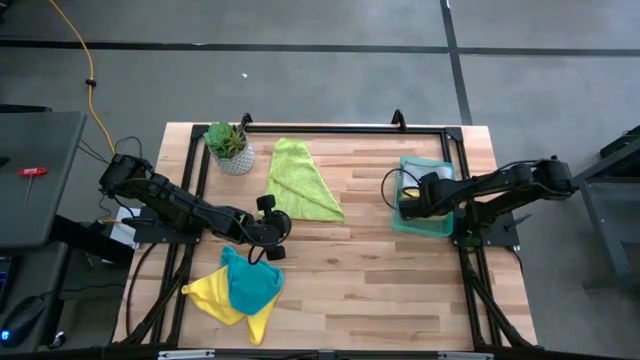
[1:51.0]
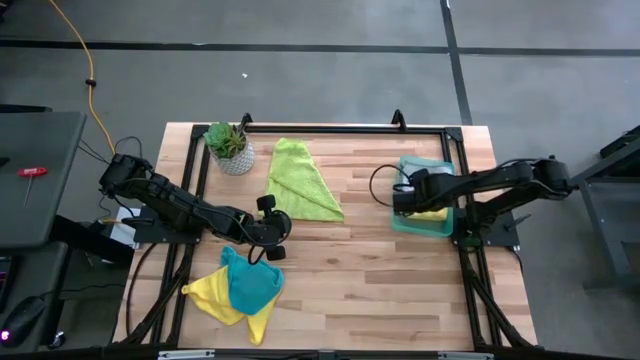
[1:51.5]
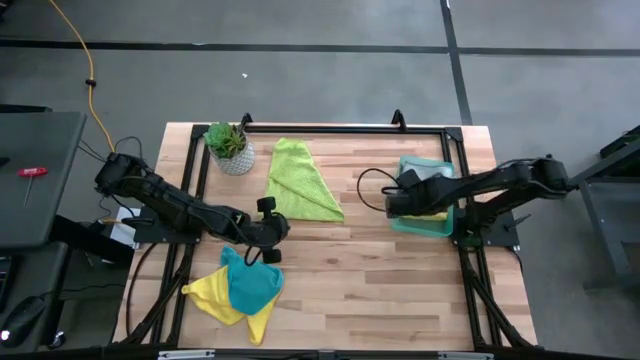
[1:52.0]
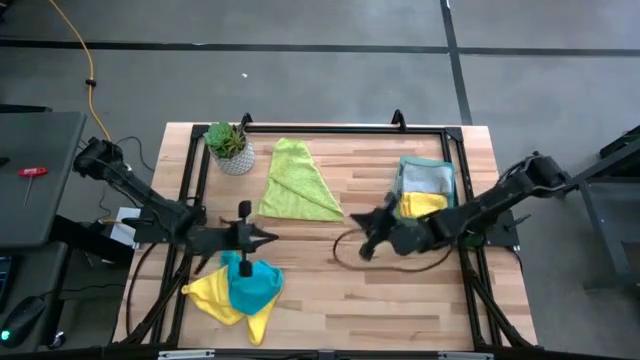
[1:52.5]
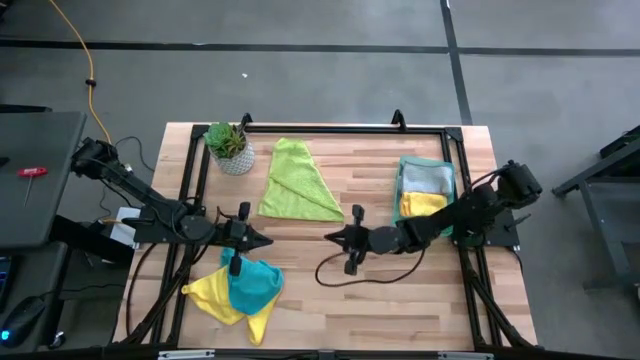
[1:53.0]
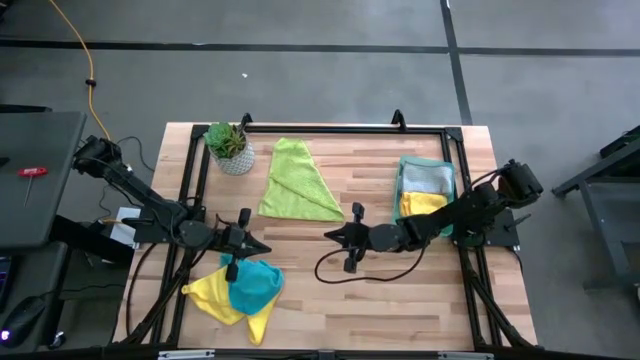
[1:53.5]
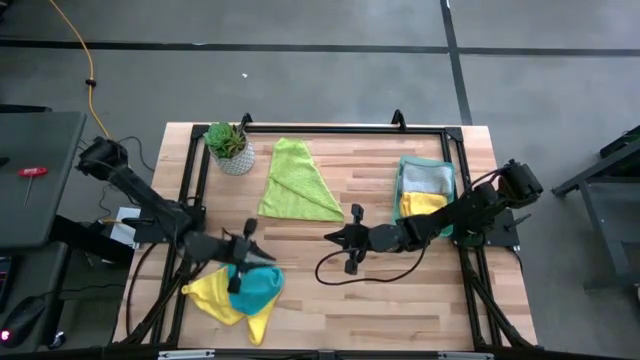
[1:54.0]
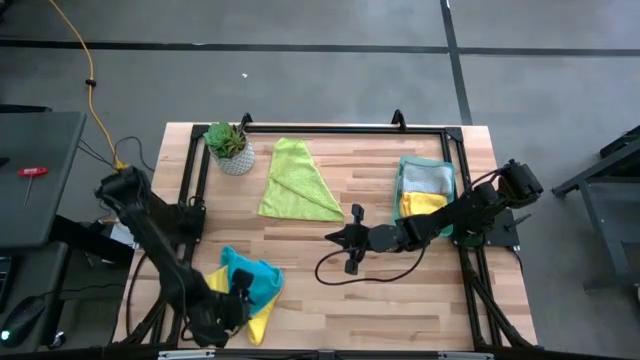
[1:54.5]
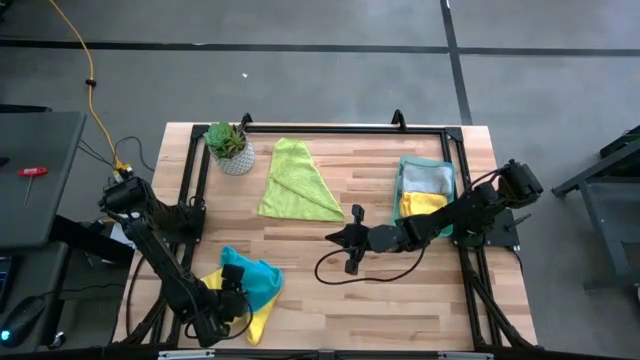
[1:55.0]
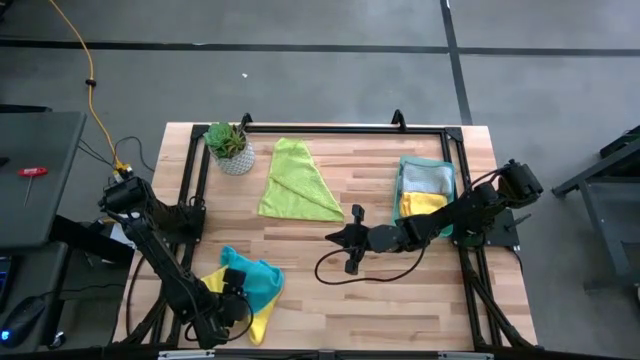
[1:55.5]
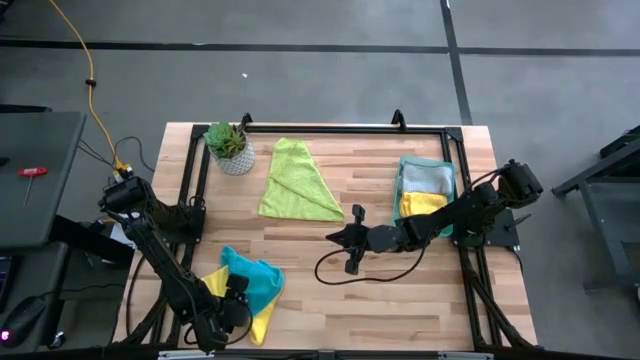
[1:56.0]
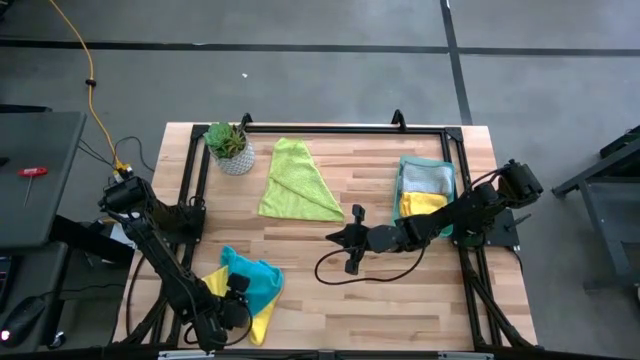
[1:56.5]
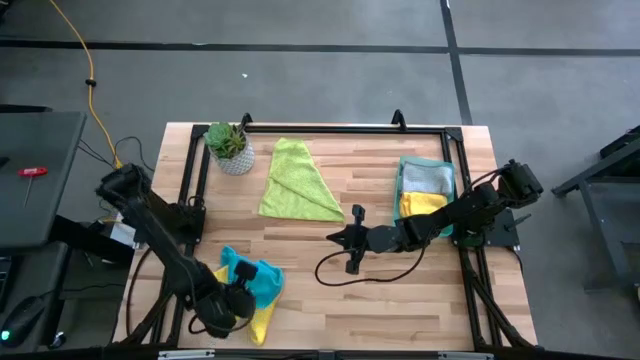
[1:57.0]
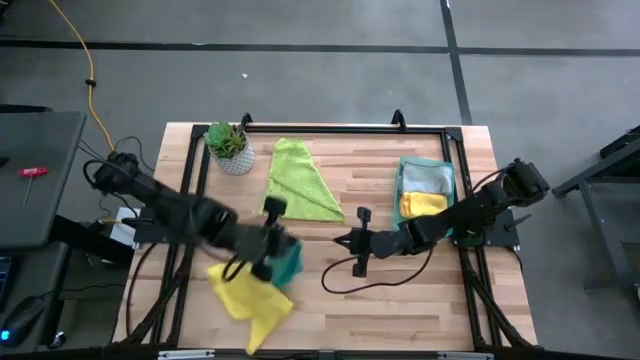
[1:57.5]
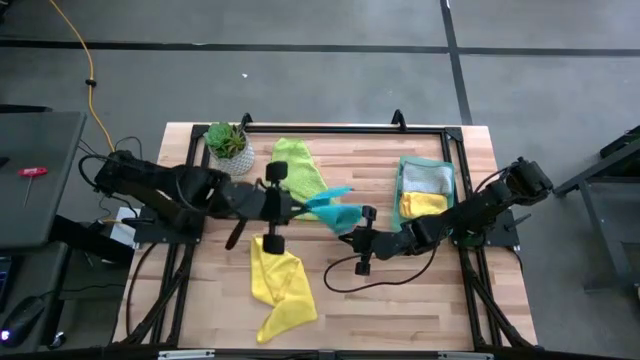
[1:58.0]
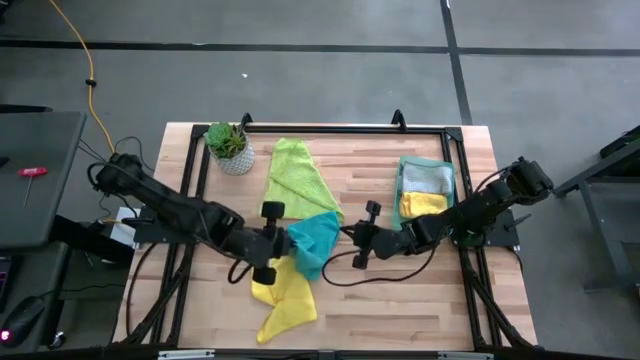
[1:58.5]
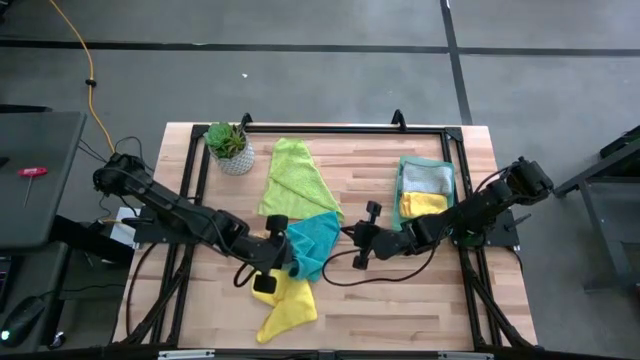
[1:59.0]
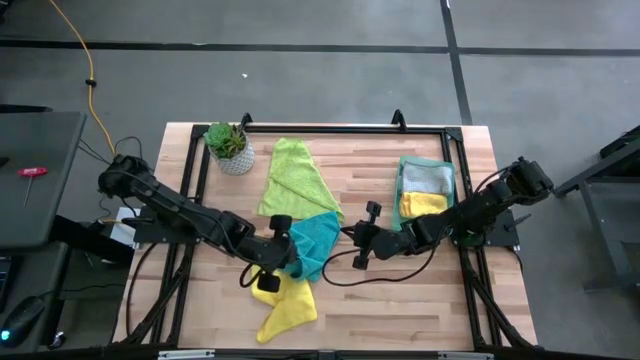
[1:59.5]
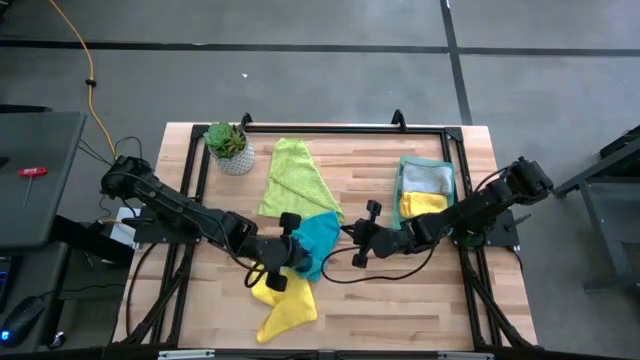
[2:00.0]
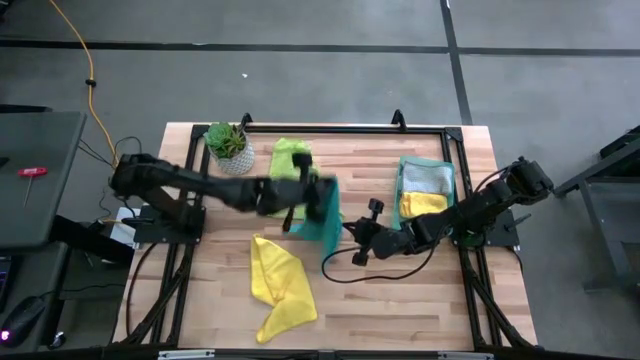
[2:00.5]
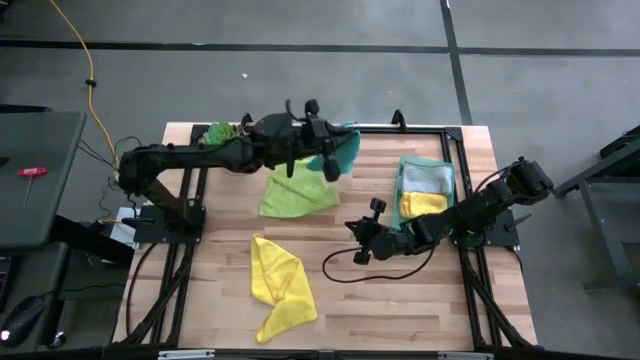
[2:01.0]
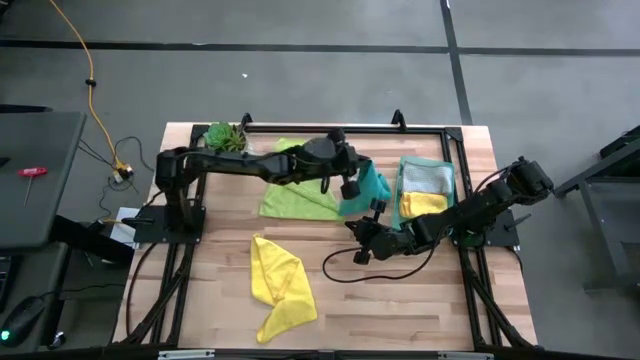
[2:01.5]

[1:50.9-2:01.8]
Task: Fold microfiber towels
Move the blue microfiber cloth to the center of the table

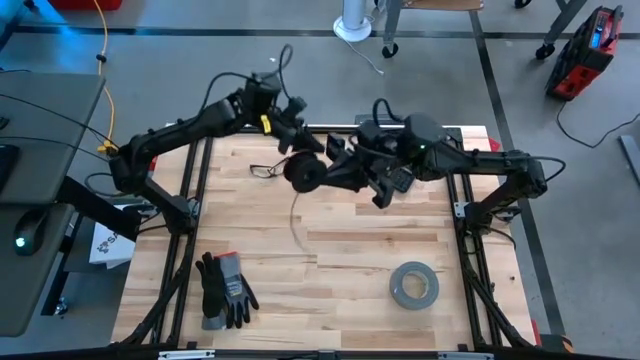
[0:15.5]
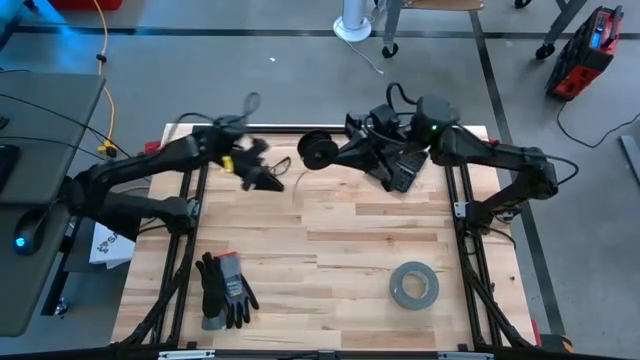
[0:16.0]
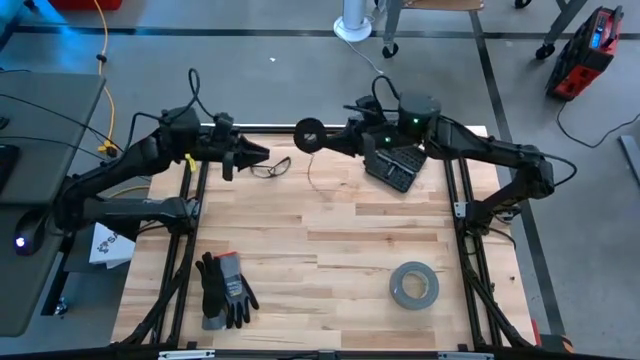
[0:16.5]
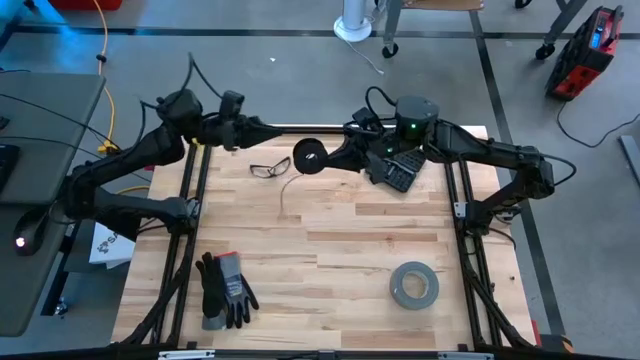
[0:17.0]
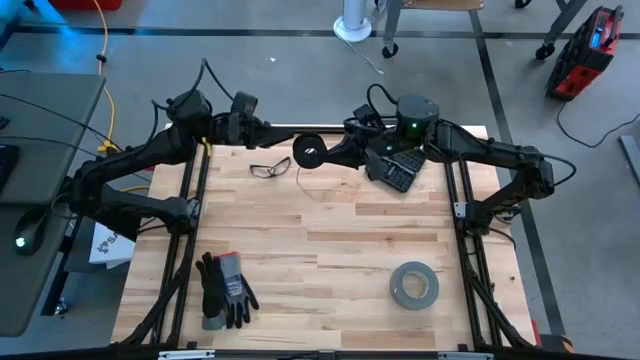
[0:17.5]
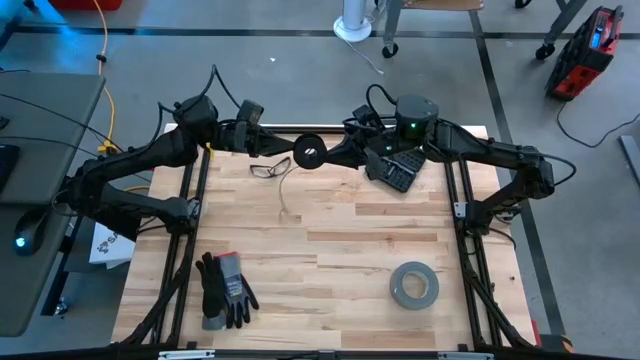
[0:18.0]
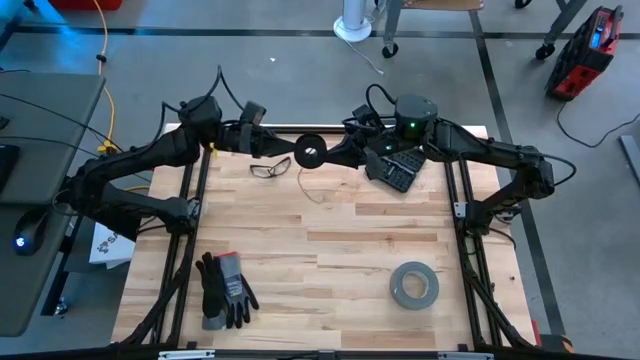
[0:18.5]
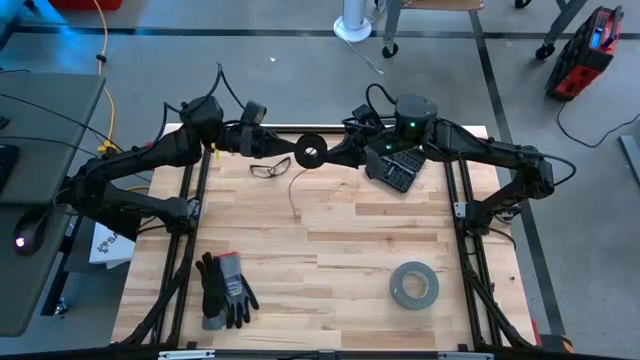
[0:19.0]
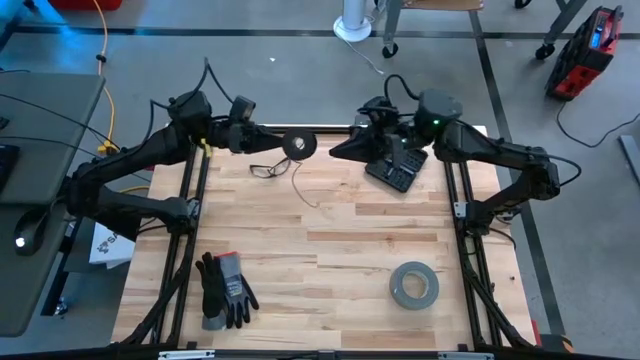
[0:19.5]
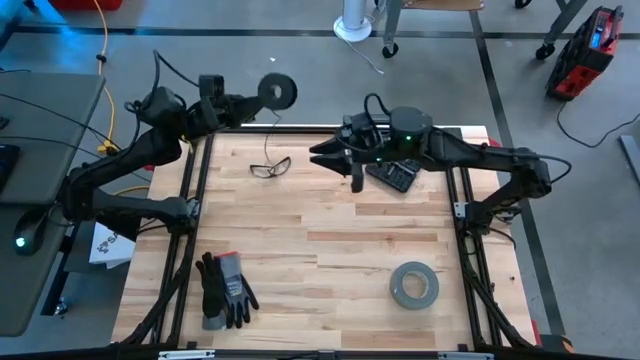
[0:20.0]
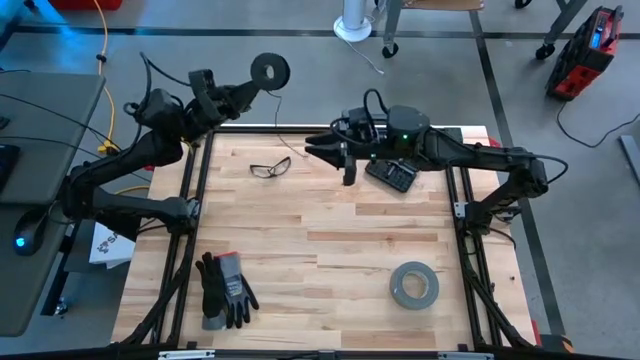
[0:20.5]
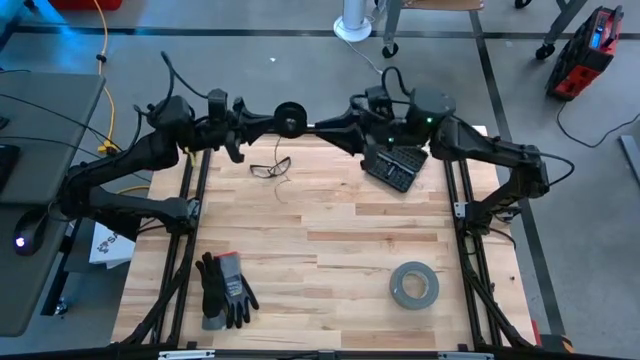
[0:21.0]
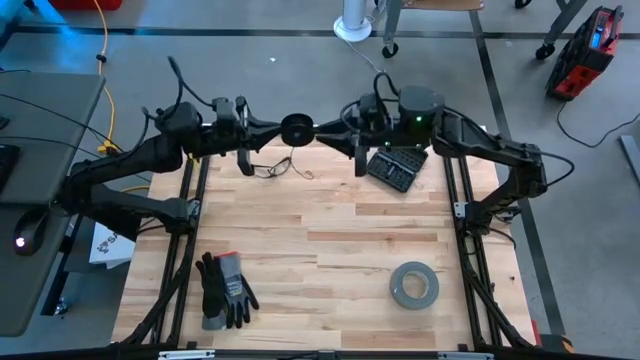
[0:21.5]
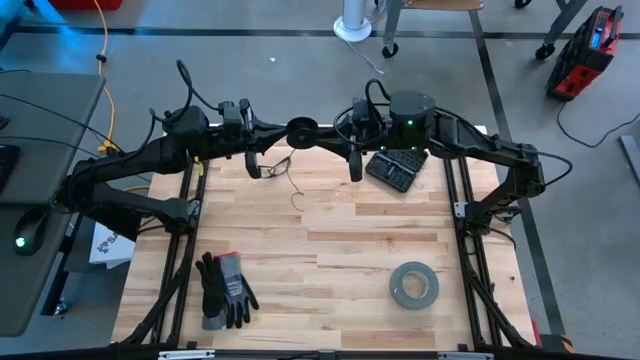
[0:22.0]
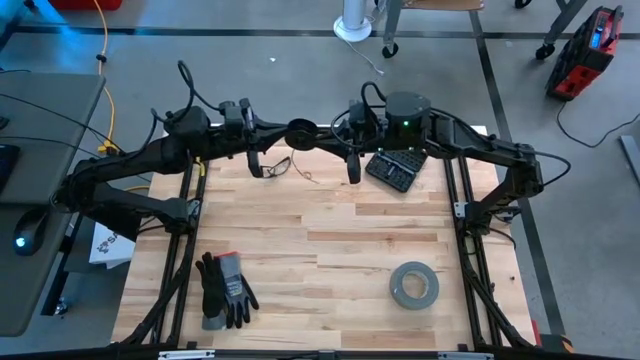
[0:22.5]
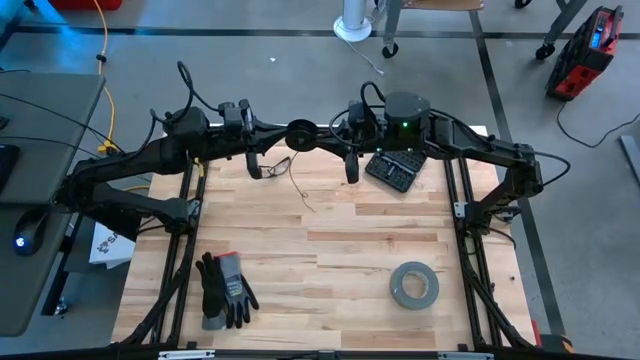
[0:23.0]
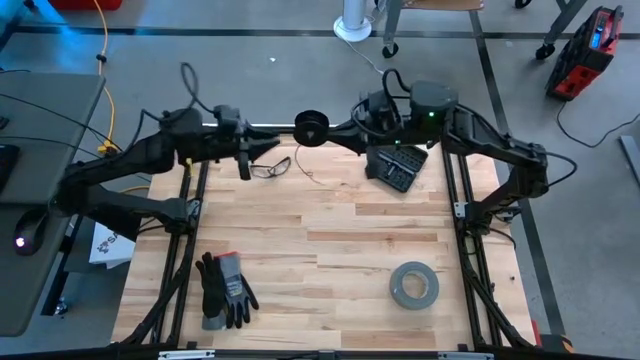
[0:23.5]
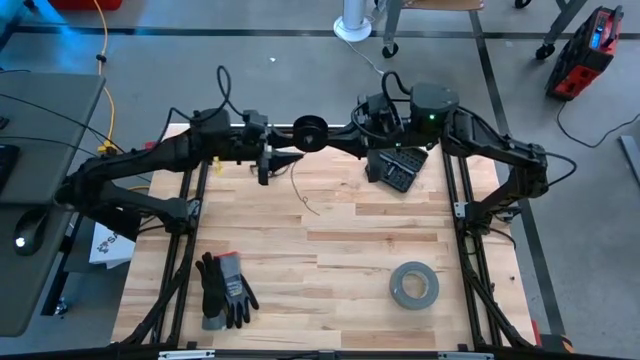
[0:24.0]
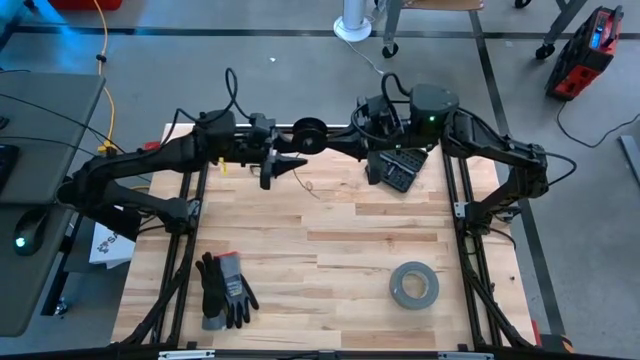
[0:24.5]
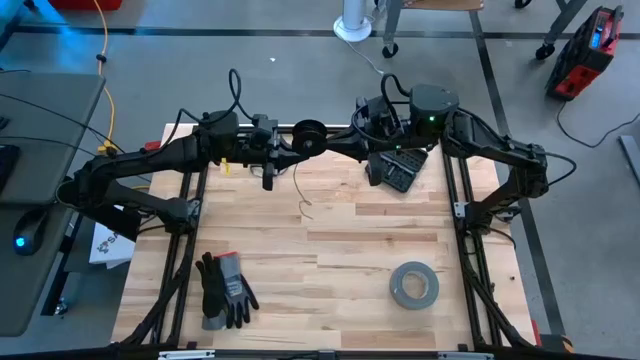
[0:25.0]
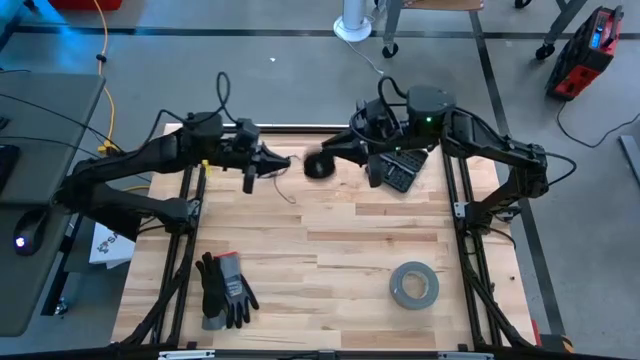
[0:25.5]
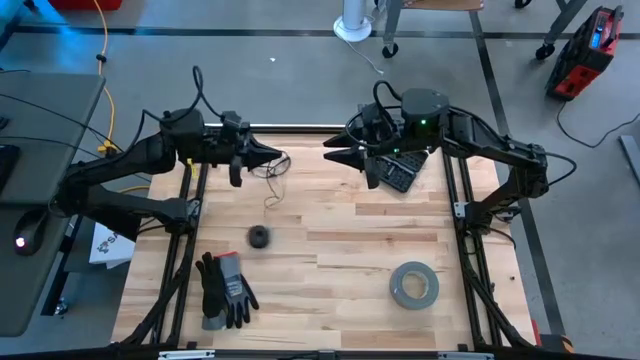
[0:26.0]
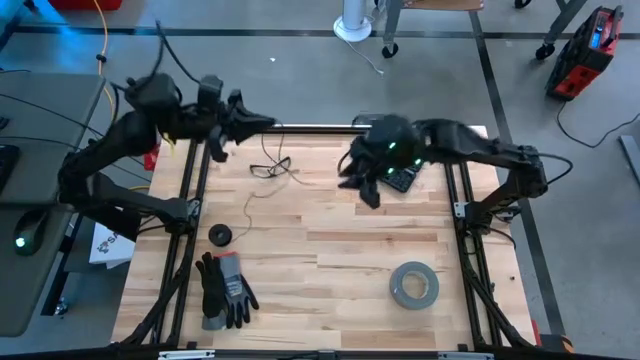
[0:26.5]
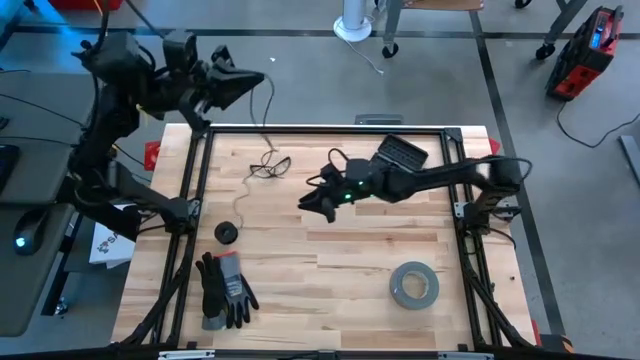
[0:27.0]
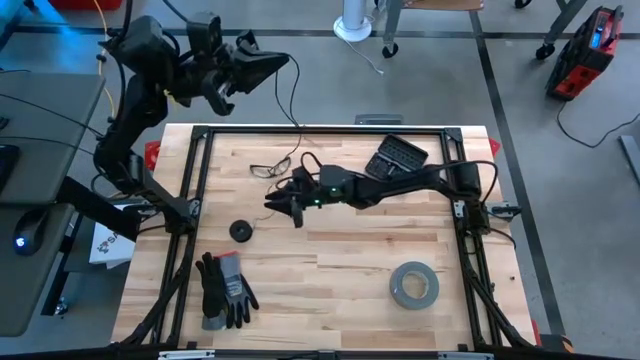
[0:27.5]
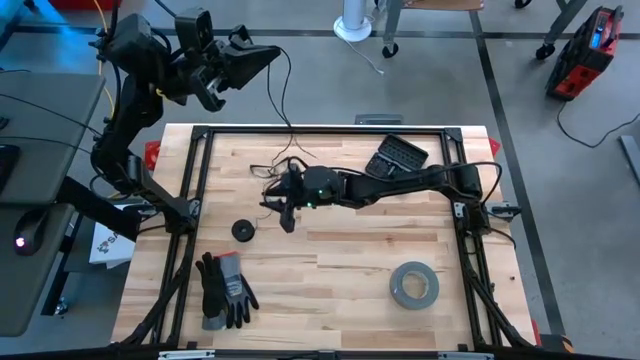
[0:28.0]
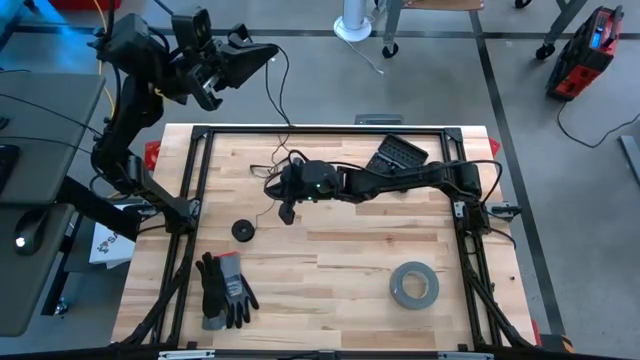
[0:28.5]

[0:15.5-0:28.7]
Task: Coil cords
Uncoil the black wire from the black spool
